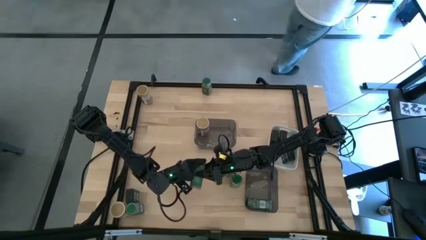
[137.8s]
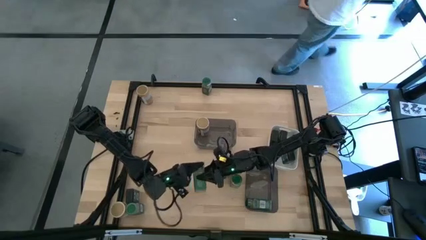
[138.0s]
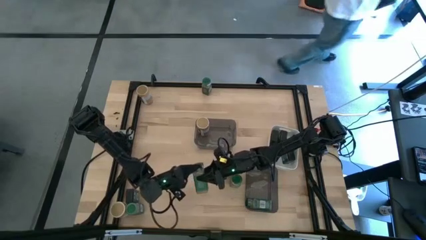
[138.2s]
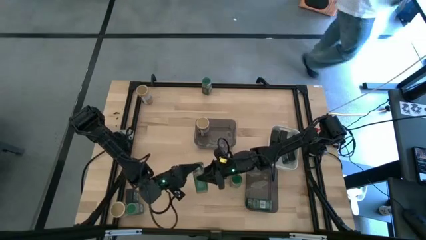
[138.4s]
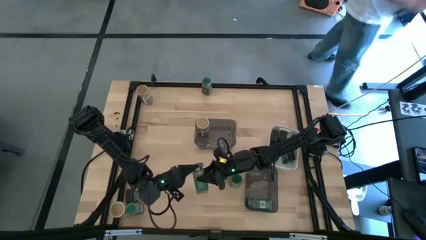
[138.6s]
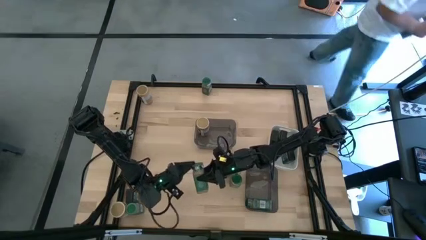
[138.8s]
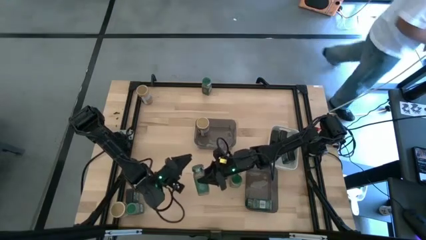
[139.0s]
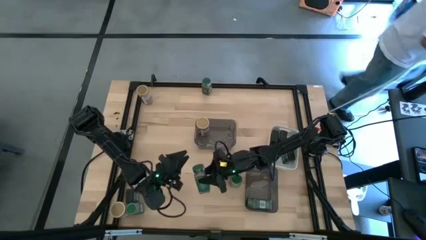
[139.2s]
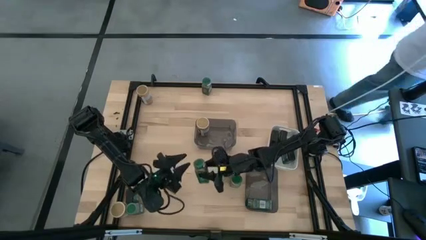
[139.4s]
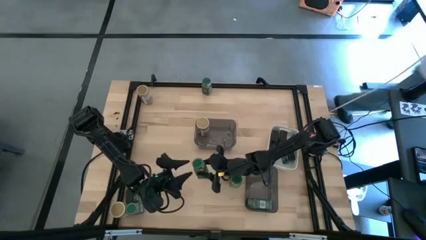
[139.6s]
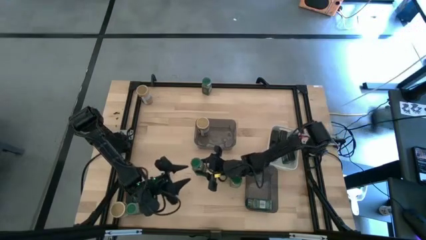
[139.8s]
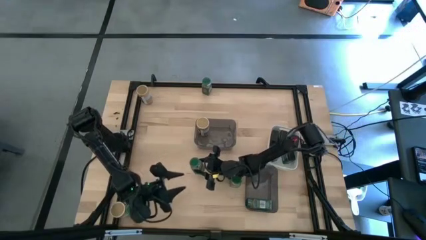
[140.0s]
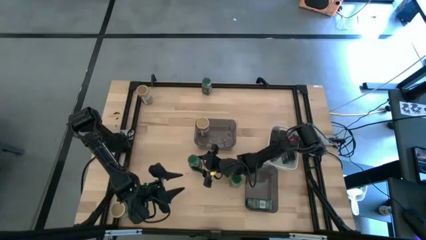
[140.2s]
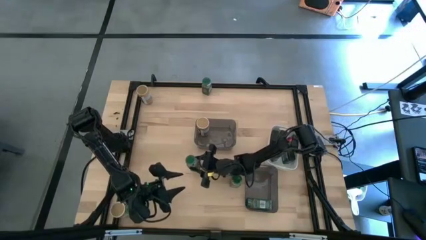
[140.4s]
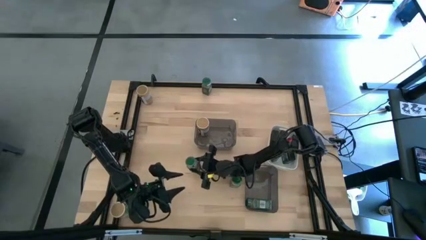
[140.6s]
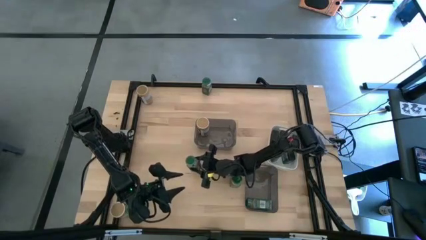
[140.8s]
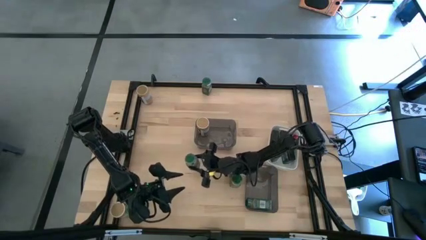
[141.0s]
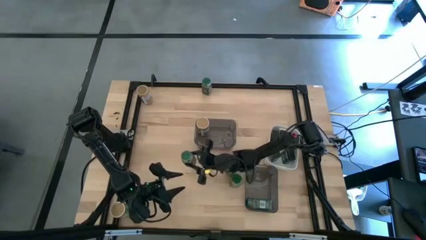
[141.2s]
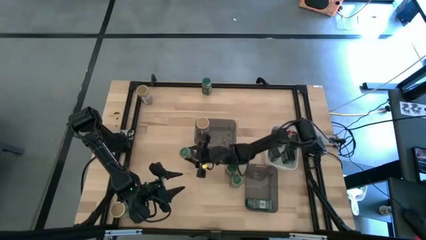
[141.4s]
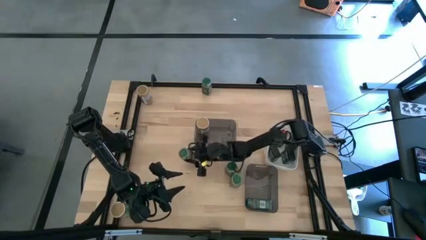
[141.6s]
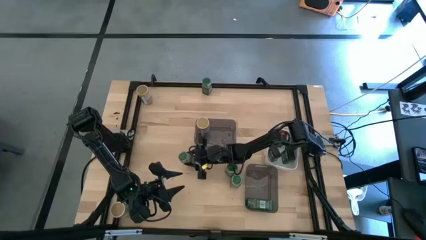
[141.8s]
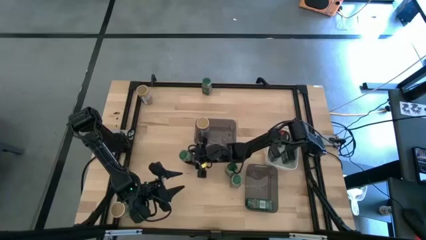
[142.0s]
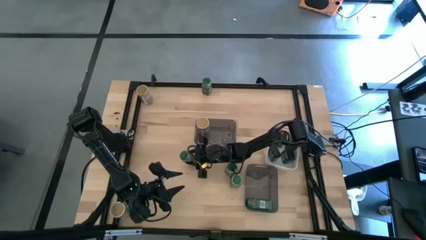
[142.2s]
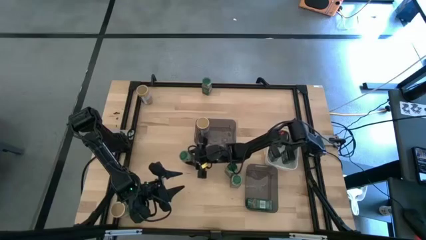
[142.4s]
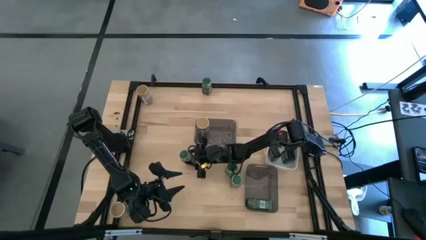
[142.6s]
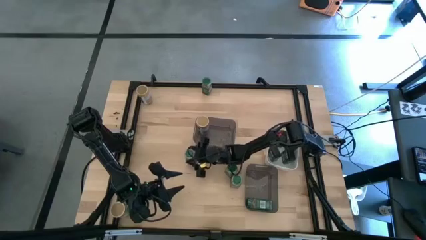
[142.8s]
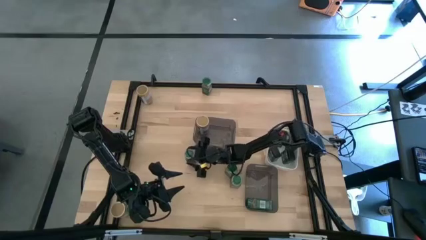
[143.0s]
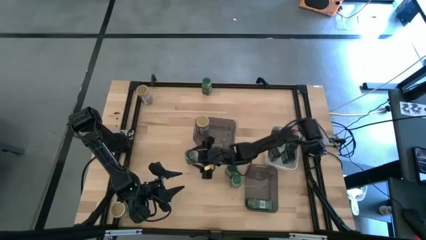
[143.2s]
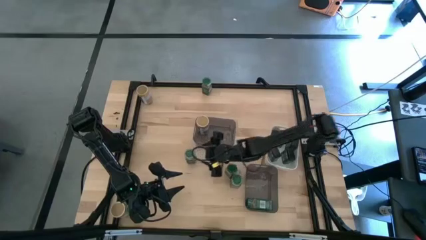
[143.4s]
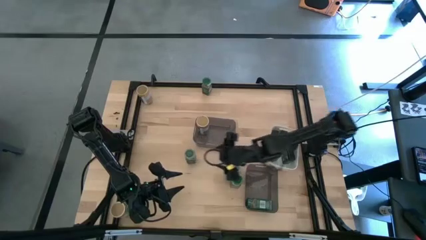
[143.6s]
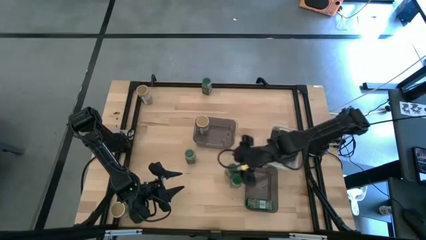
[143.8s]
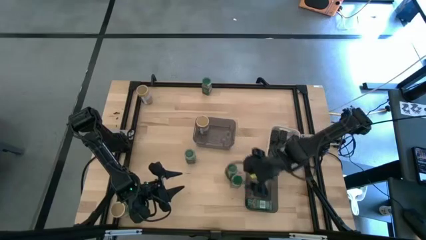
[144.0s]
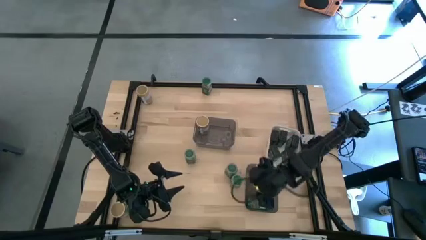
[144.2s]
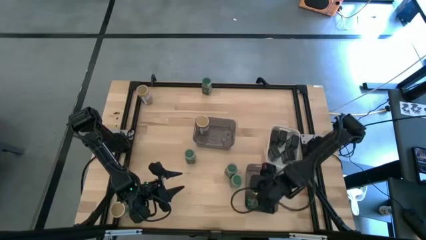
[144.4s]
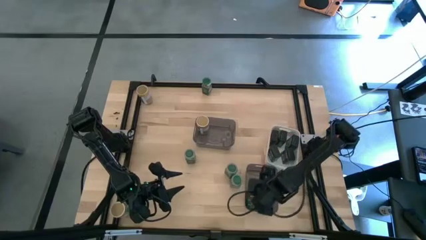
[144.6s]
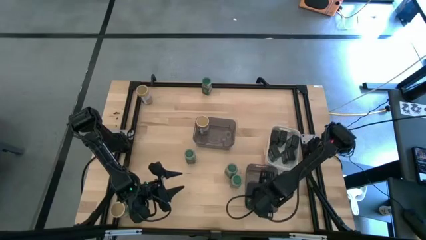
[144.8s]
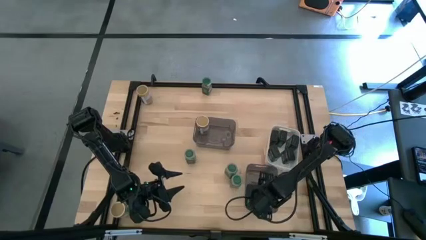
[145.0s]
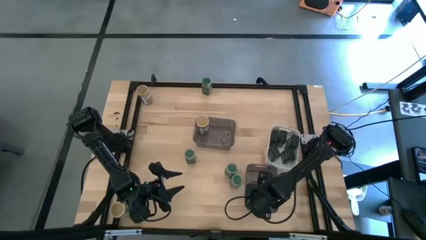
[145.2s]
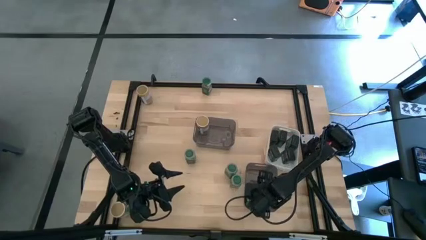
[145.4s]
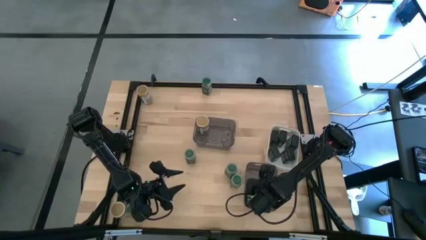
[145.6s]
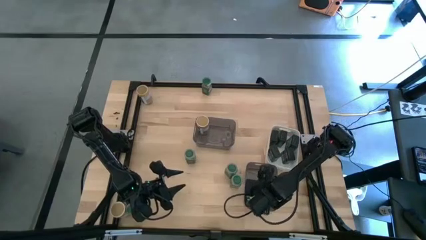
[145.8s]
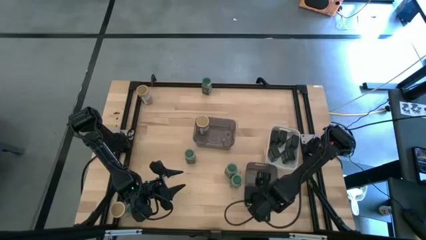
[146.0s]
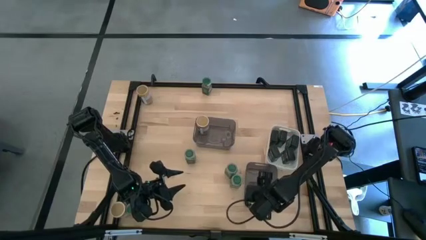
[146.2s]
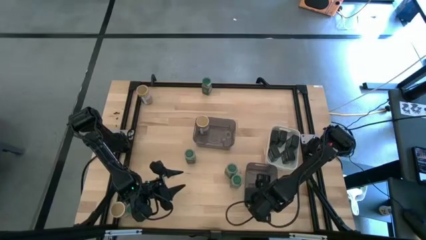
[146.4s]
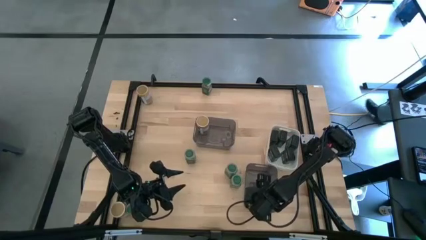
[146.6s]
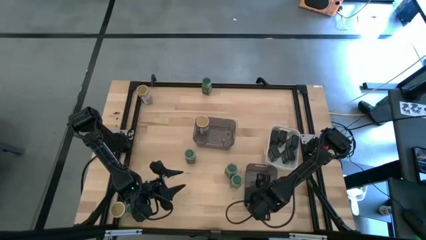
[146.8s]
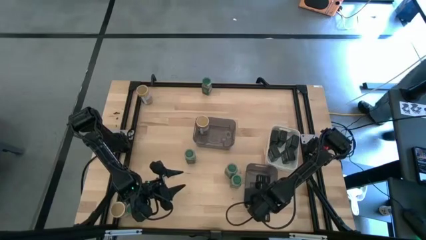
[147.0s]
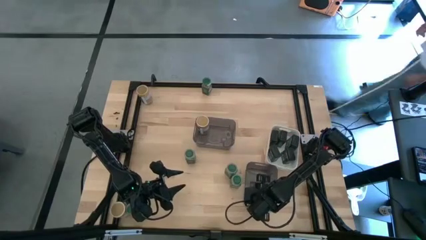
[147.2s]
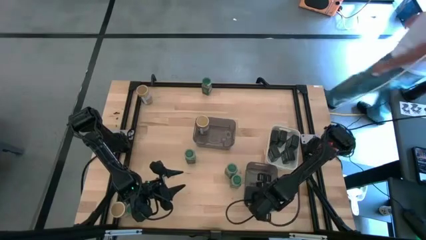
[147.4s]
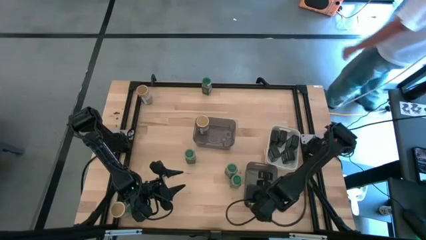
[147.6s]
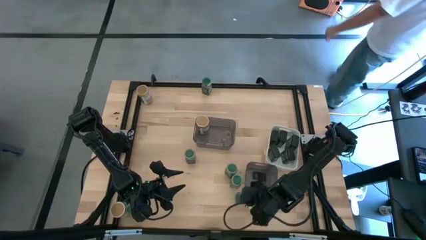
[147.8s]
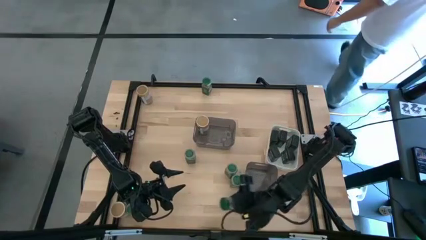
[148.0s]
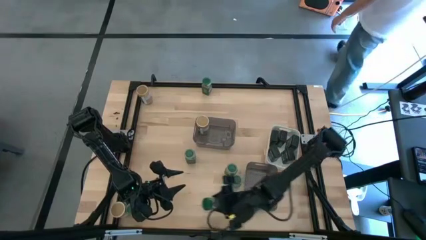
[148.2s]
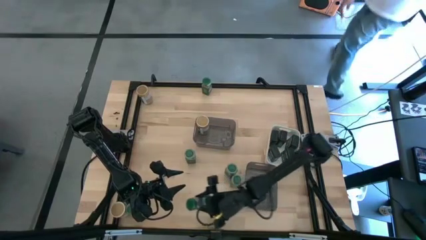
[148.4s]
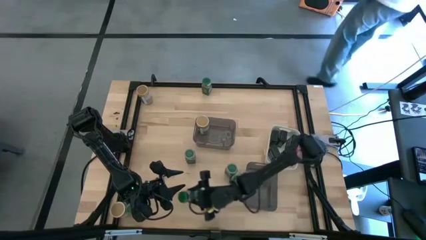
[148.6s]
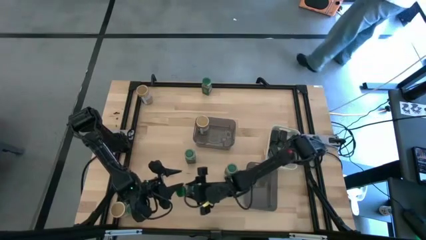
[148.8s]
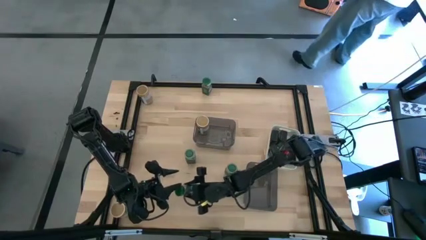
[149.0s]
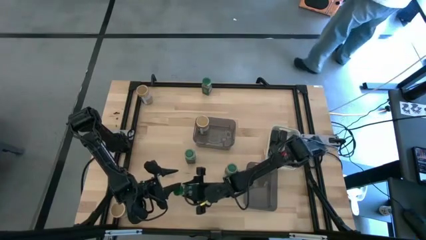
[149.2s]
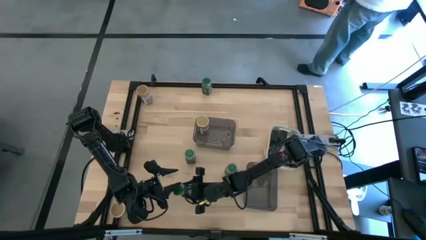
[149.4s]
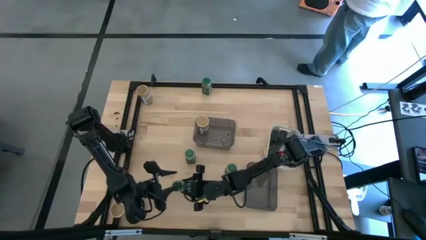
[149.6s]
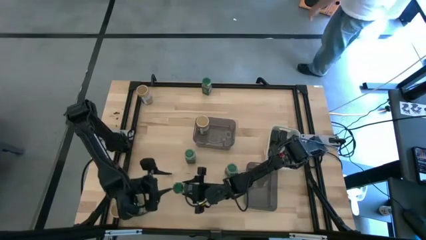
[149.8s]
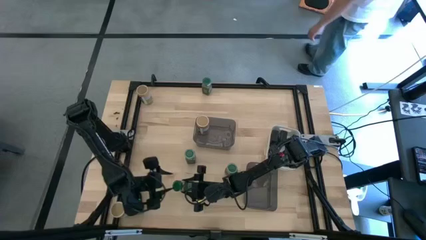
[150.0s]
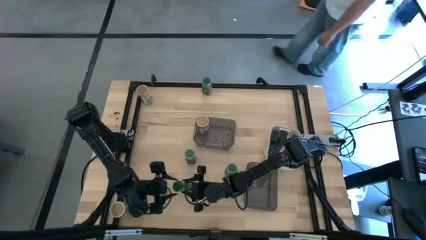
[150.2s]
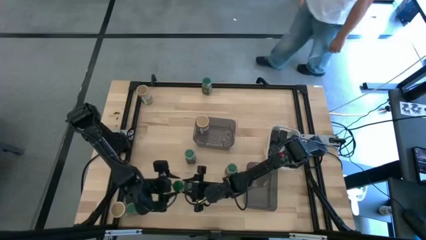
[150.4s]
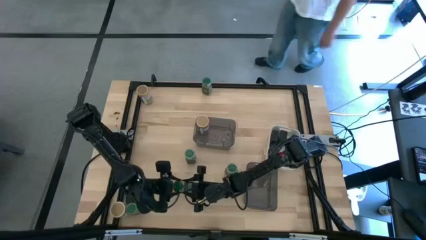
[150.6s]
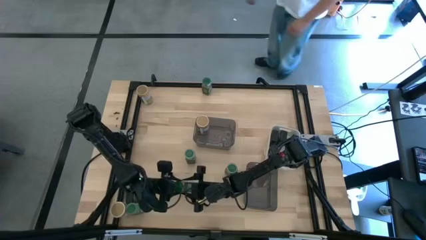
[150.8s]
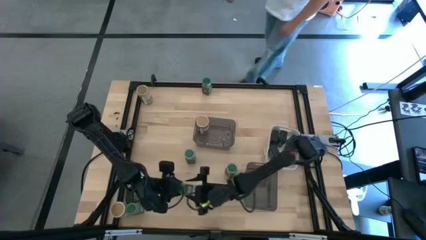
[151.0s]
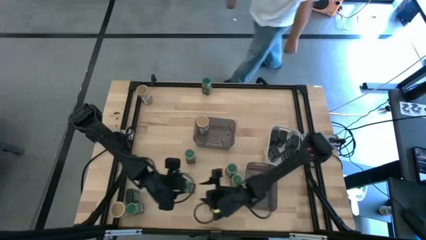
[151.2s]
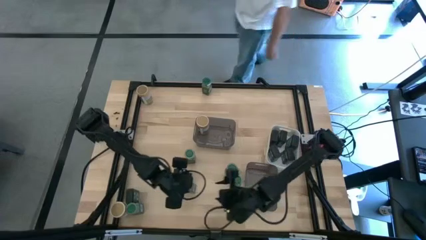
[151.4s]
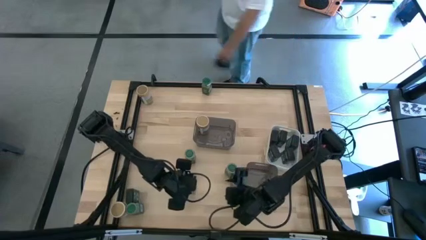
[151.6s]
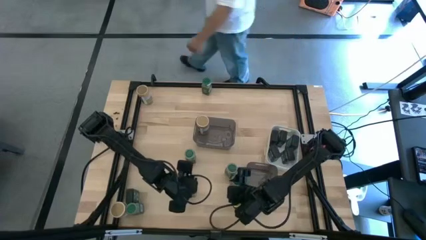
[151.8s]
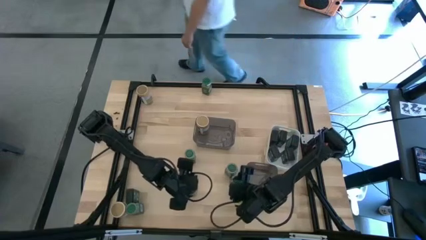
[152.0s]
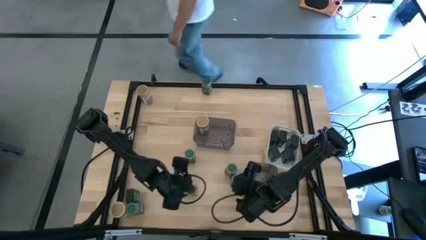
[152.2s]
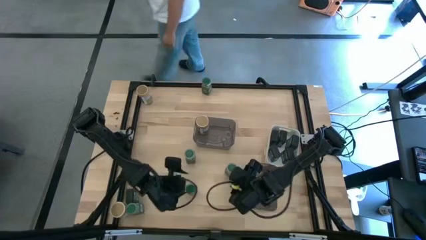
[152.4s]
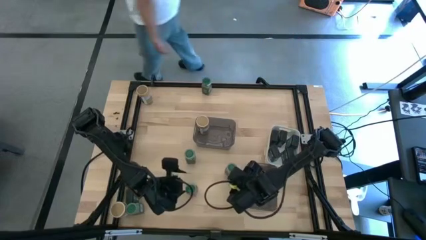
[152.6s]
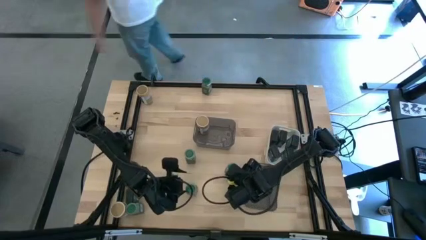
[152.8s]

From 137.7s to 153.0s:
Task: Sort spices by type
Adjust the green seasoning bottles

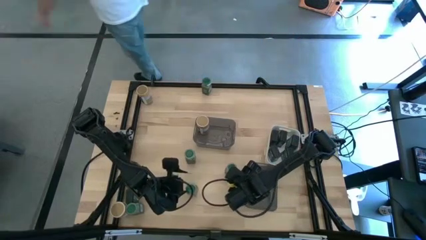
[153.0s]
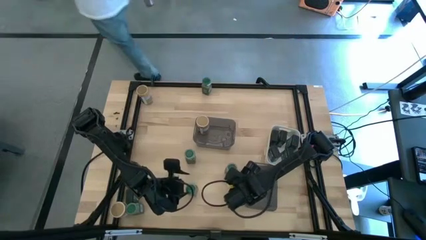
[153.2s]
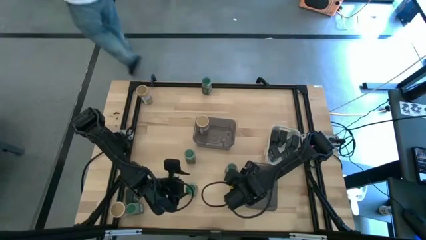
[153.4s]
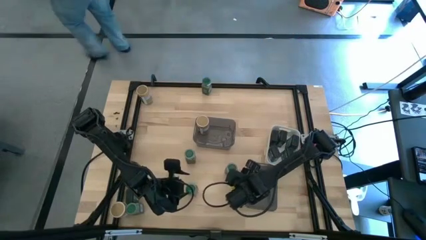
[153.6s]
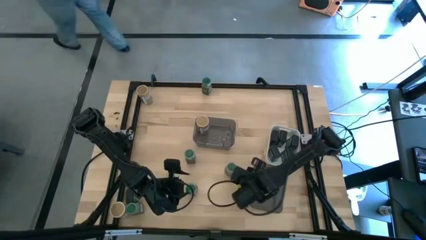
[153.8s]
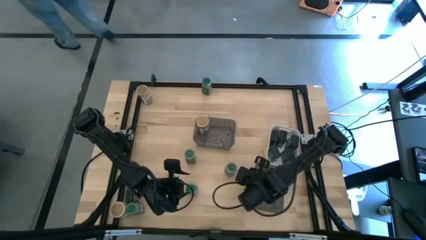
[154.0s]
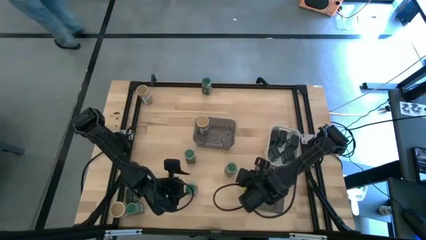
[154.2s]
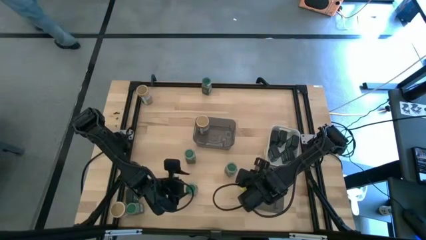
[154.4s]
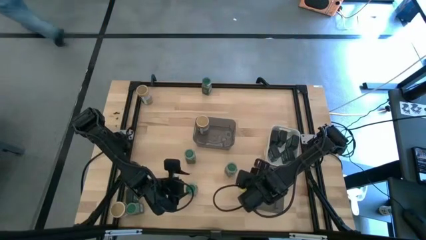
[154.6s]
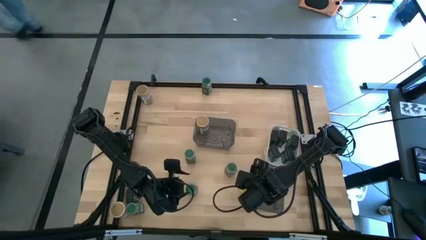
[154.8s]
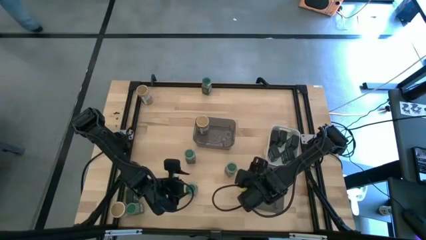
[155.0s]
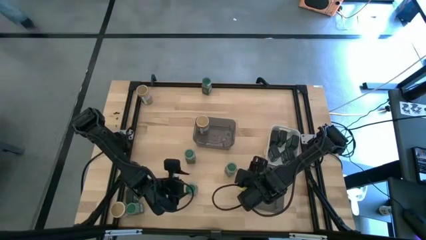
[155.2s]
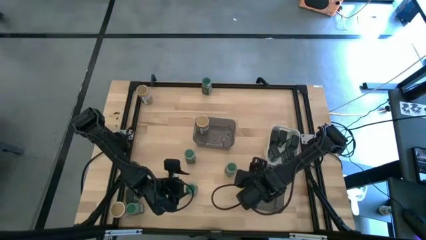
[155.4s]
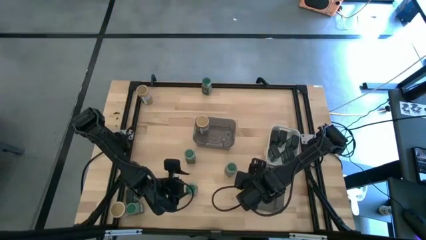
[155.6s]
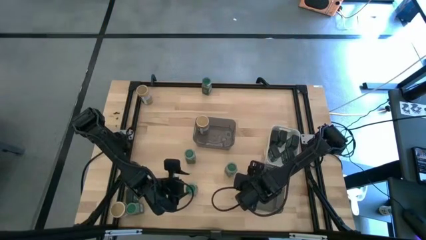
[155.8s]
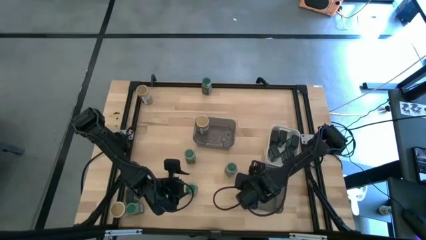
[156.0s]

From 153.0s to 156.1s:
Put the green seasoning into the bottom black bin
